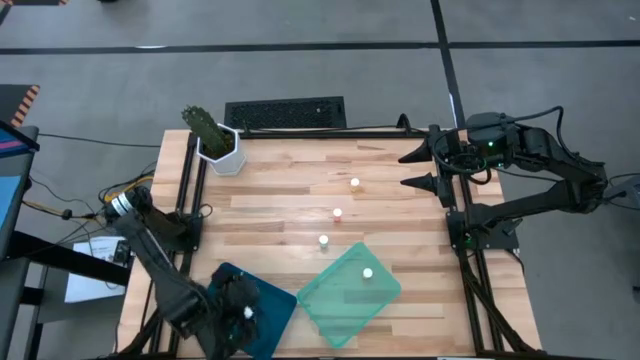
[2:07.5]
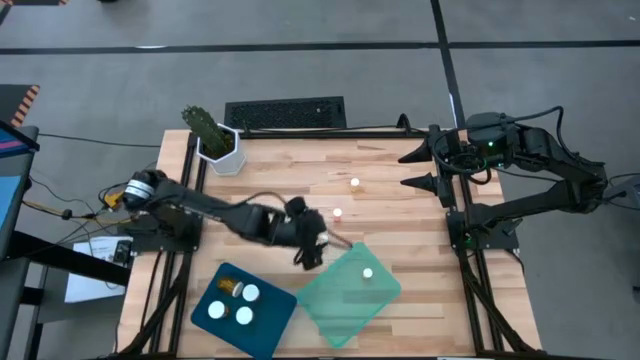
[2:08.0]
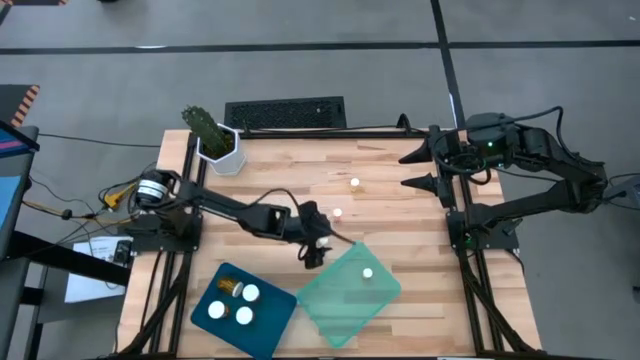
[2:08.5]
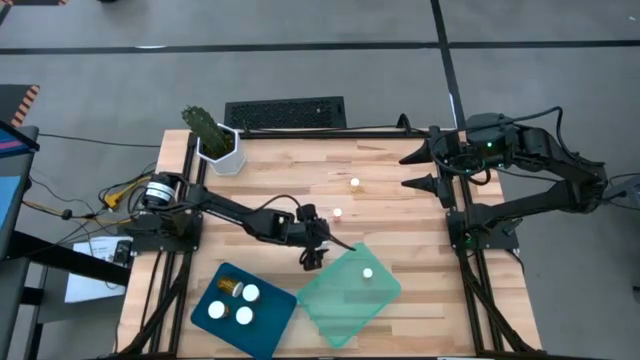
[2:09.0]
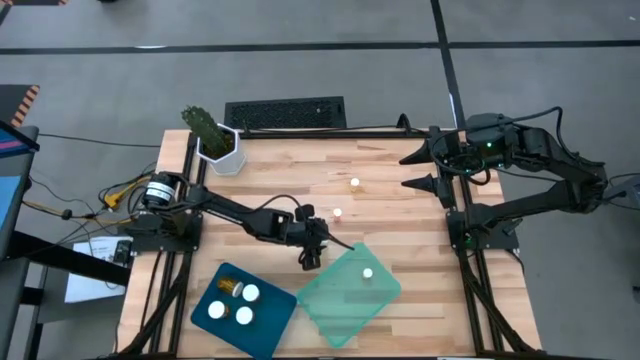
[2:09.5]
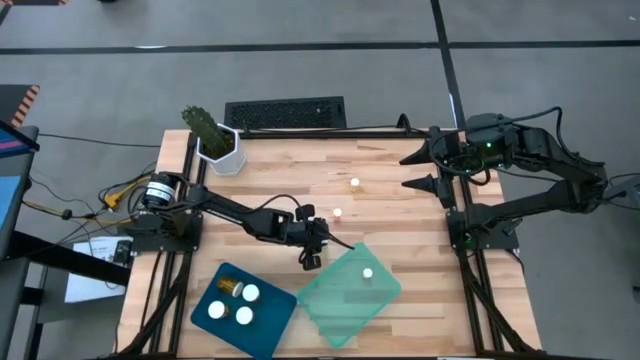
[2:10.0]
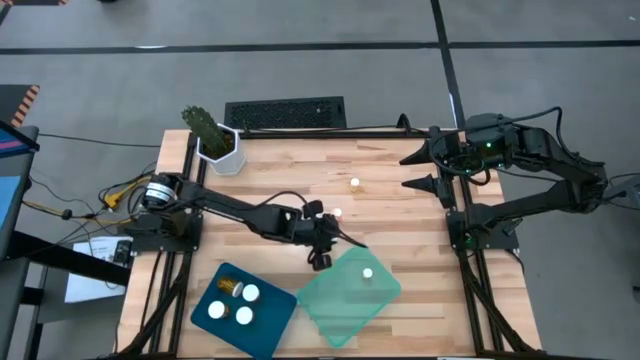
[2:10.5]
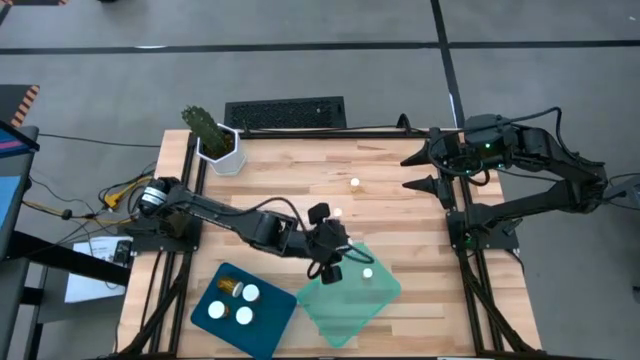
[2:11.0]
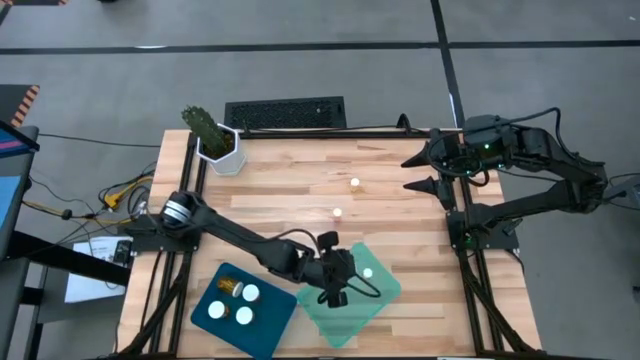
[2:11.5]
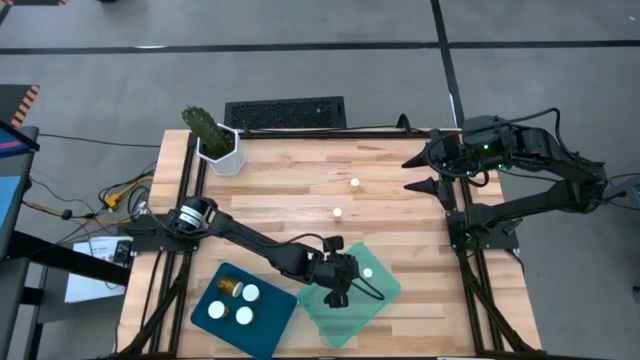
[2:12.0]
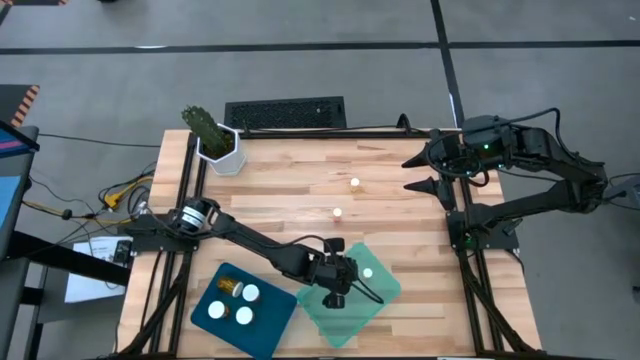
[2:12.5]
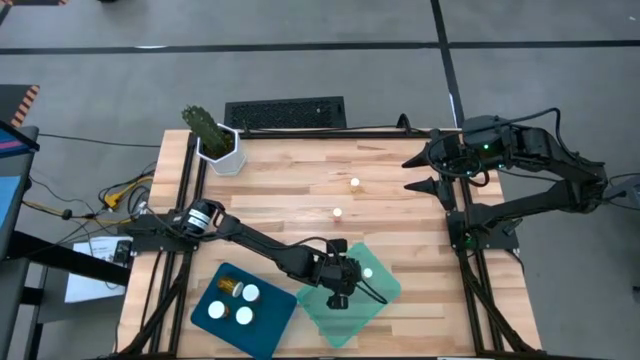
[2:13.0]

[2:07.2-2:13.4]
Task: Pick and place medicine bottles into bin by pill shape (circle, oval)
Put the small green pill bottle into the green bin

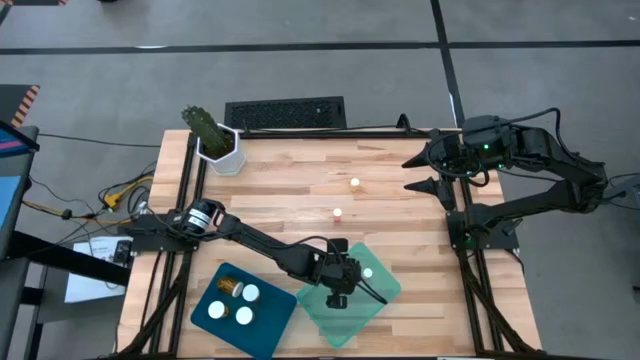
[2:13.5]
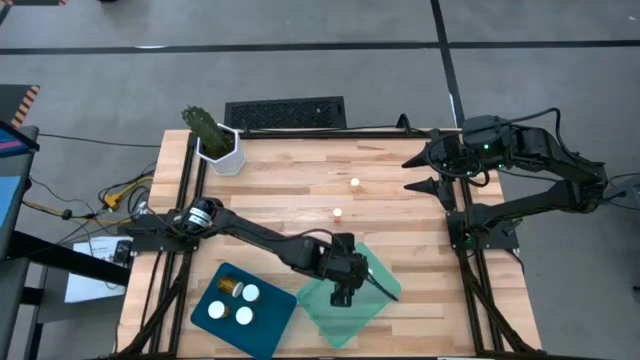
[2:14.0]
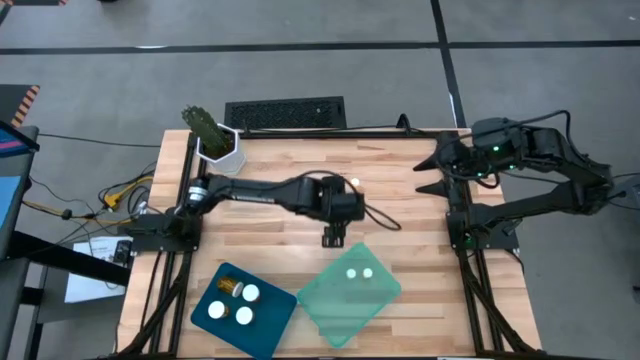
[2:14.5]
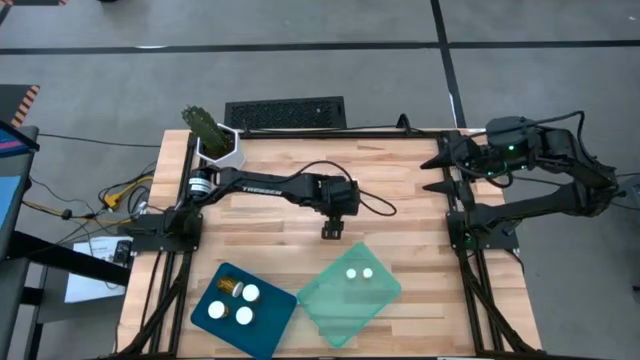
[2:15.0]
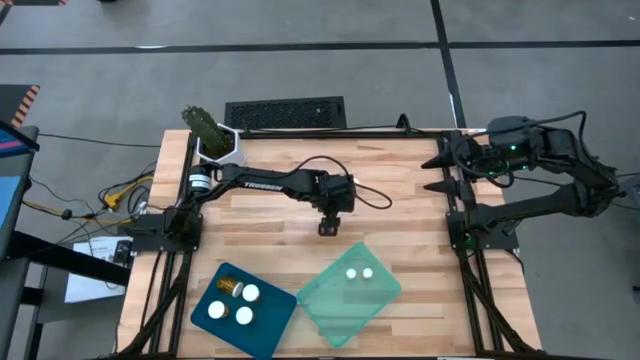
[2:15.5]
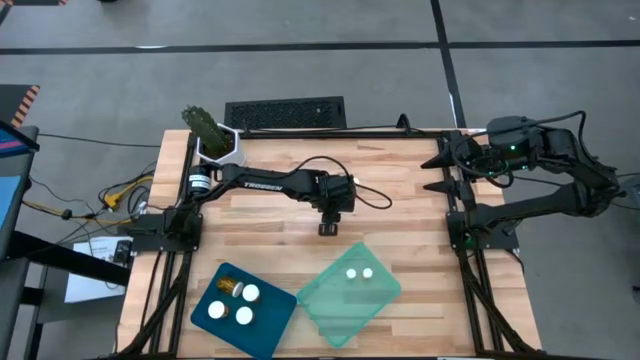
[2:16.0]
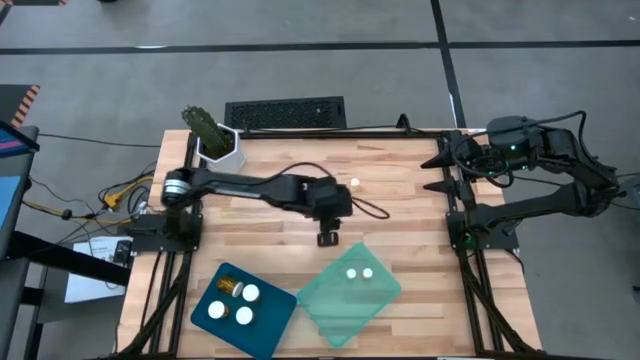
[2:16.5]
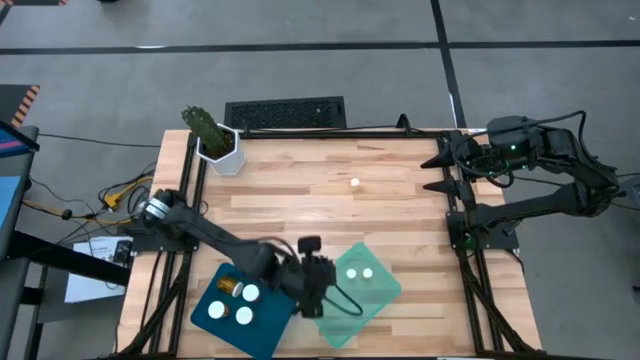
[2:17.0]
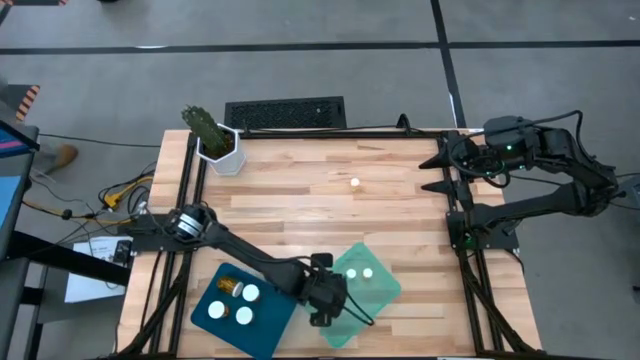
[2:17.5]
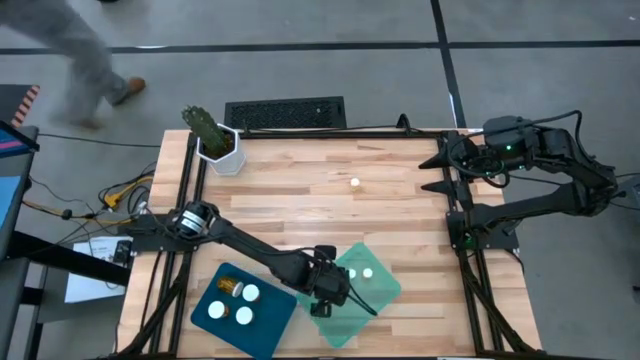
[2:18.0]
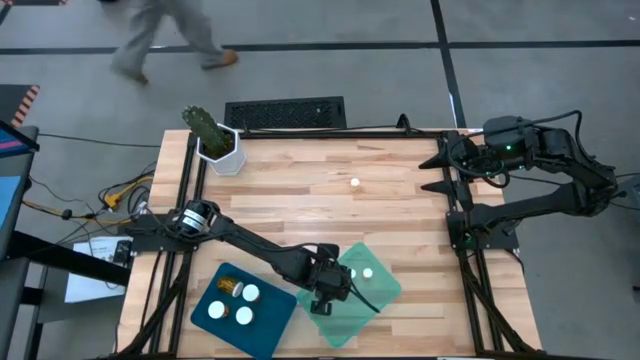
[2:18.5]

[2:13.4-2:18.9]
Put the small pink pill bottle into the green bin

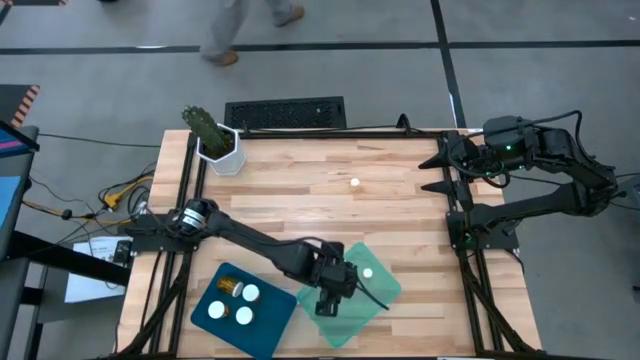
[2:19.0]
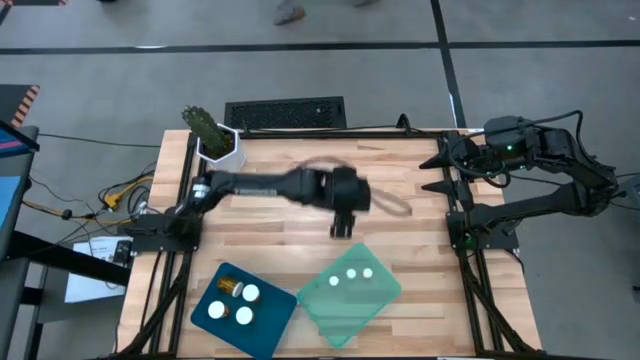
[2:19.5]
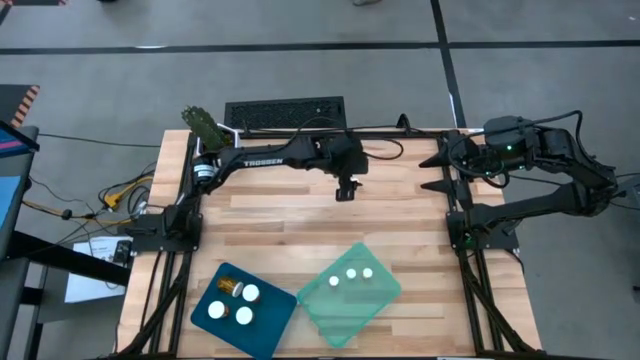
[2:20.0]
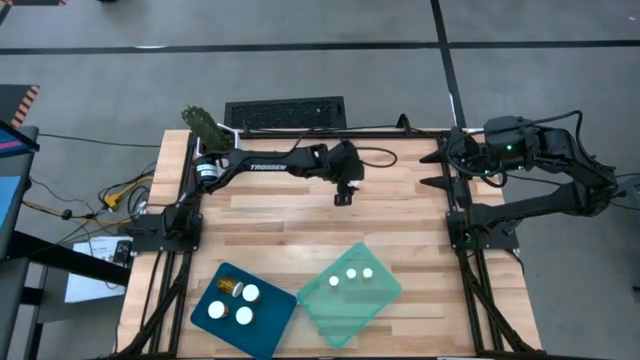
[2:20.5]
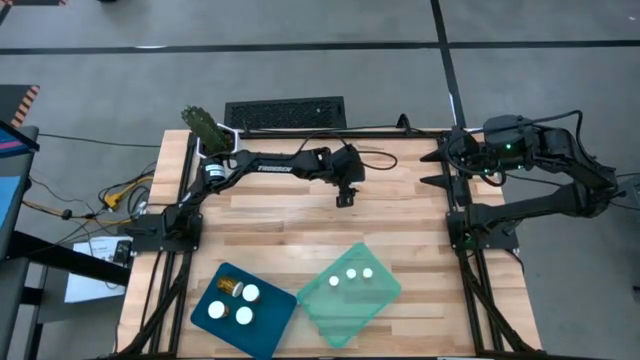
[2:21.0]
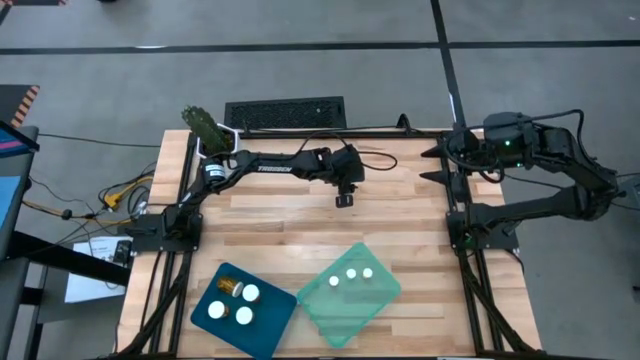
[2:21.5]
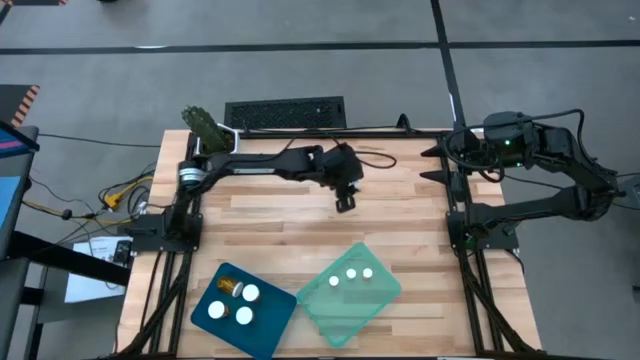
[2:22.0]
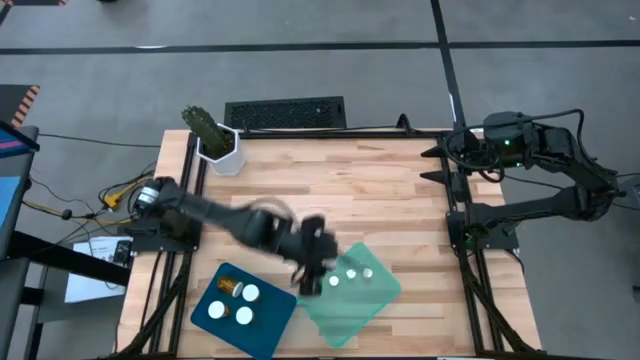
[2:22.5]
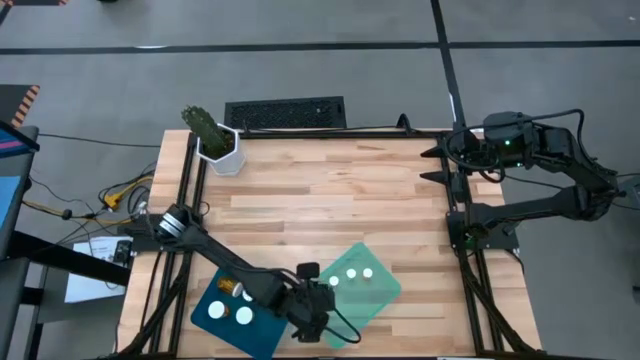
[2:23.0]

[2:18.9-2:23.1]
Put the small yellow pill bottle into green bin

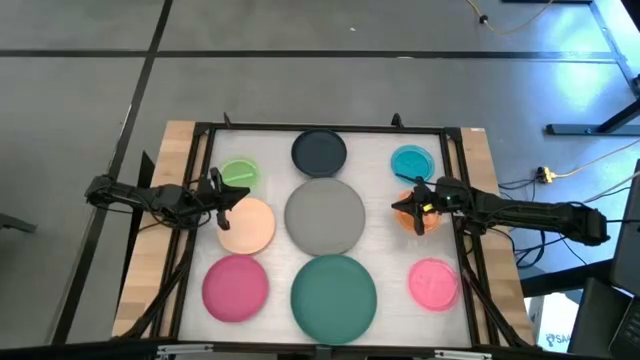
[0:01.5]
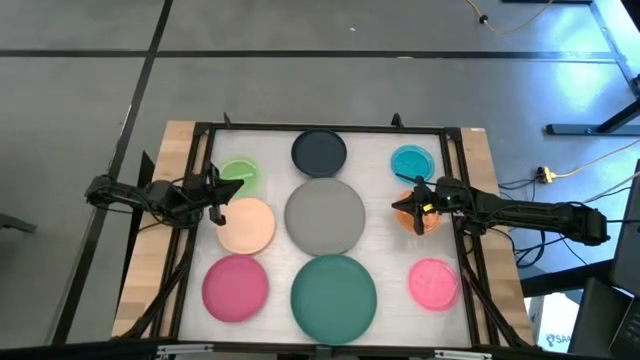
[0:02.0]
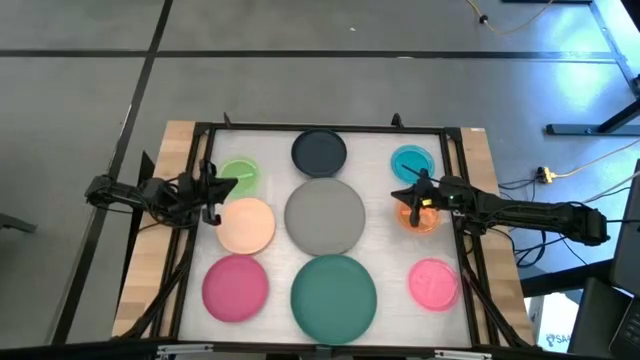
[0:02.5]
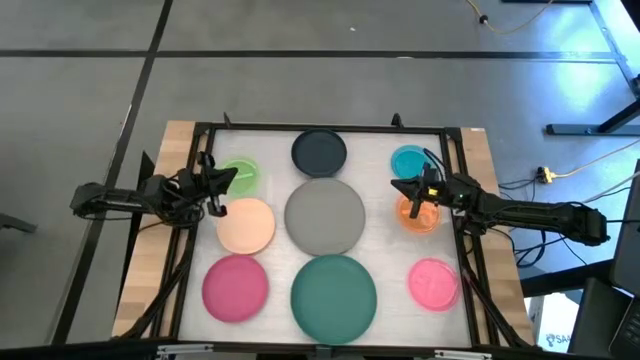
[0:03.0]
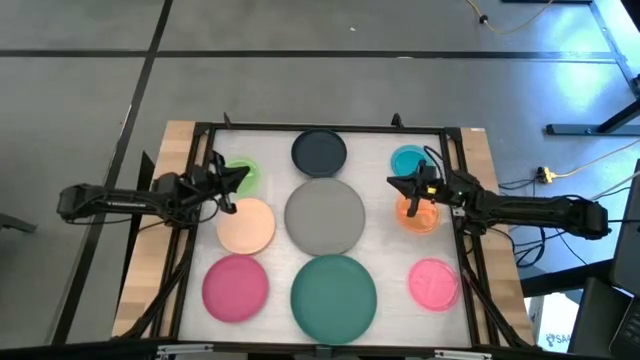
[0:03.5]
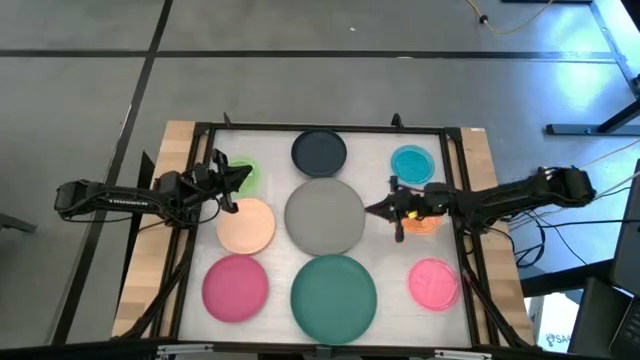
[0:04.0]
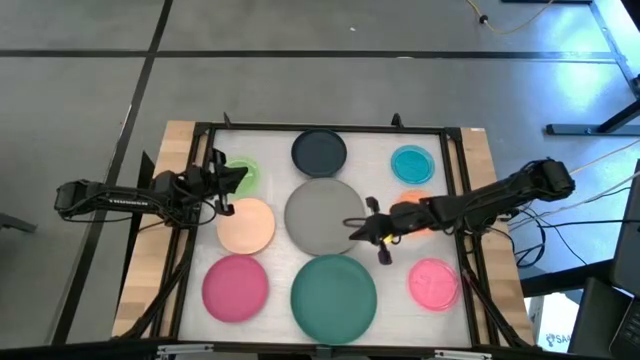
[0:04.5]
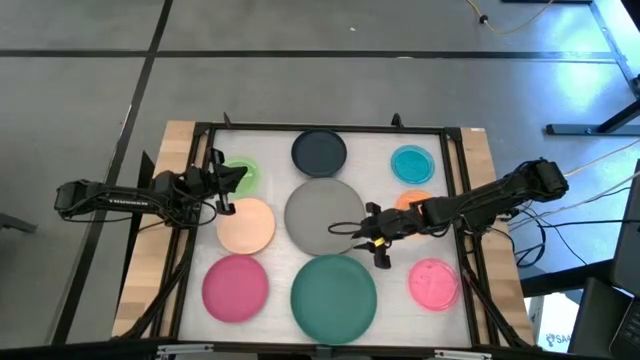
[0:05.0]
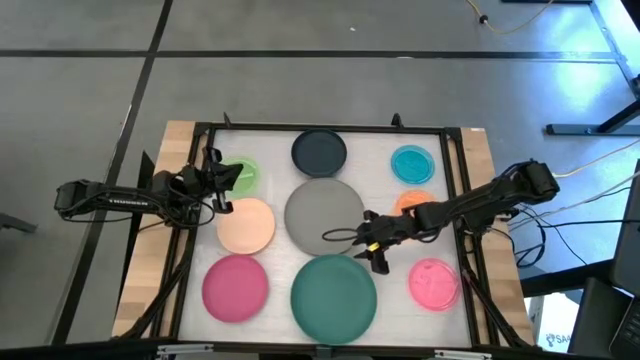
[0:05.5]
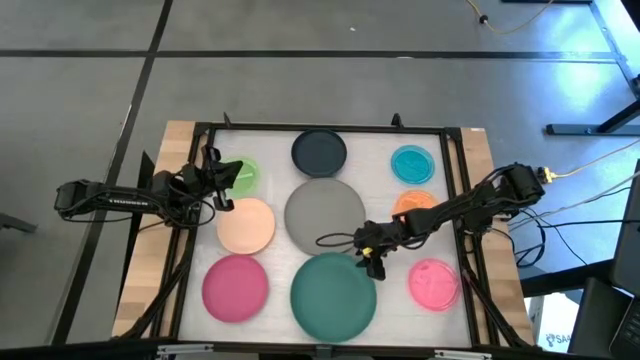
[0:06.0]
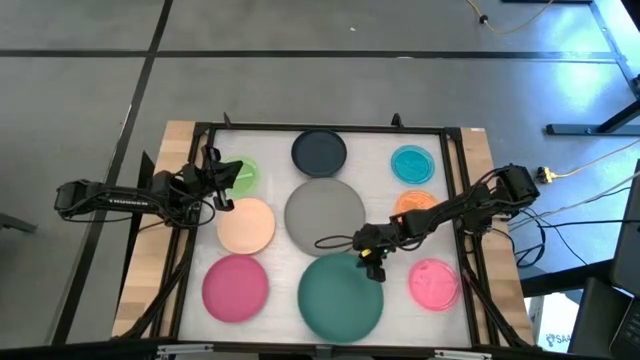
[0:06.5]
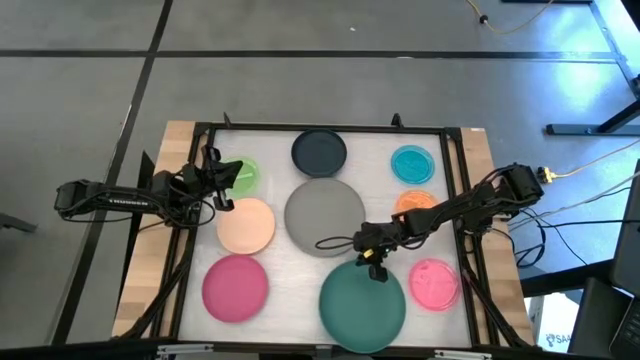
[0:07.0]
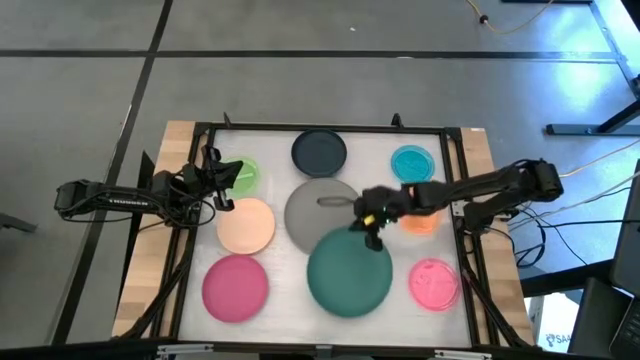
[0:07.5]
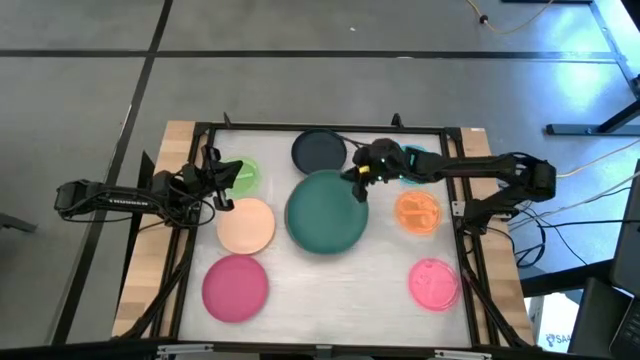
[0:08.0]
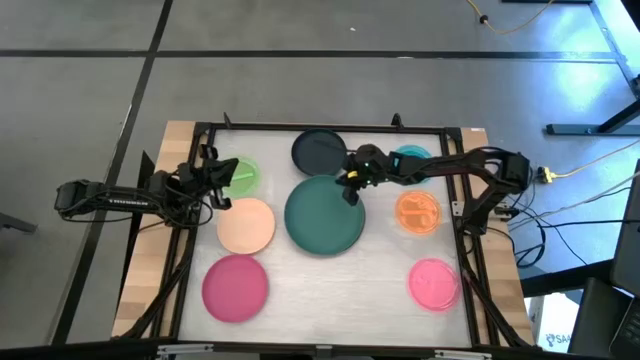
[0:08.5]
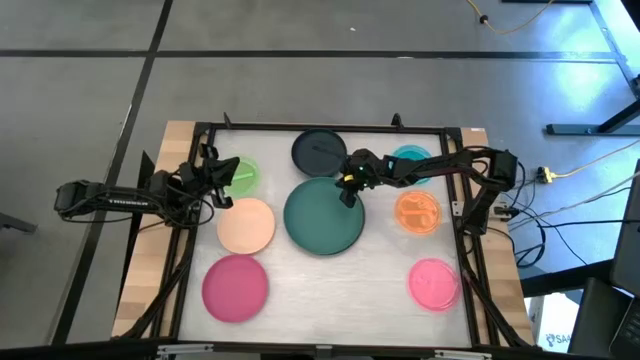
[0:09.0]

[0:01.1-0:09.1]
Task: Stack plastic plates
Stack the dark green plate on top of the gray plate
